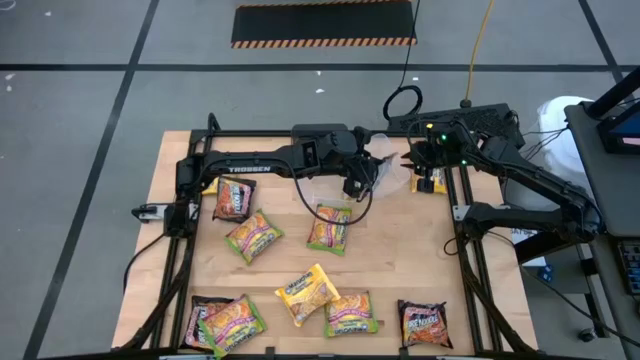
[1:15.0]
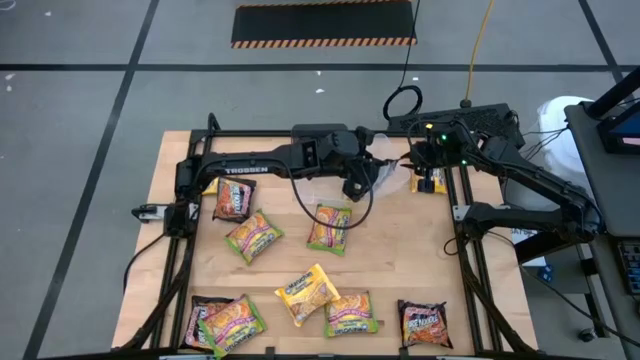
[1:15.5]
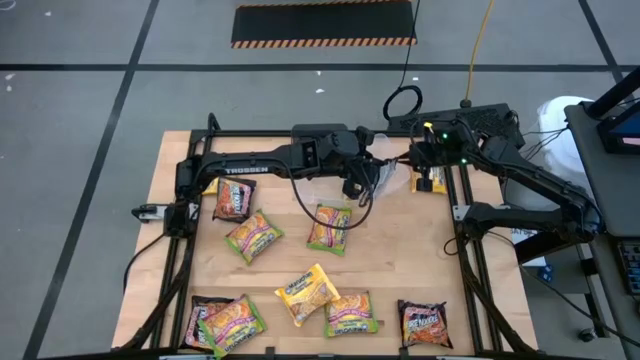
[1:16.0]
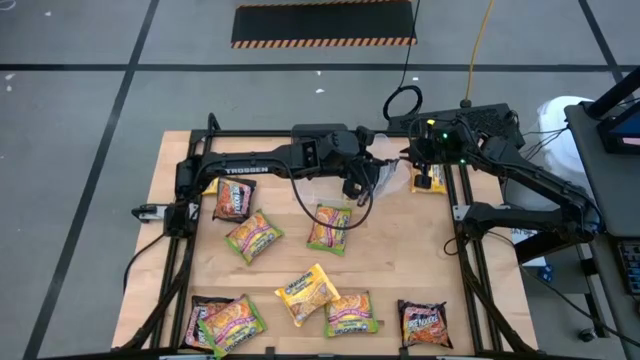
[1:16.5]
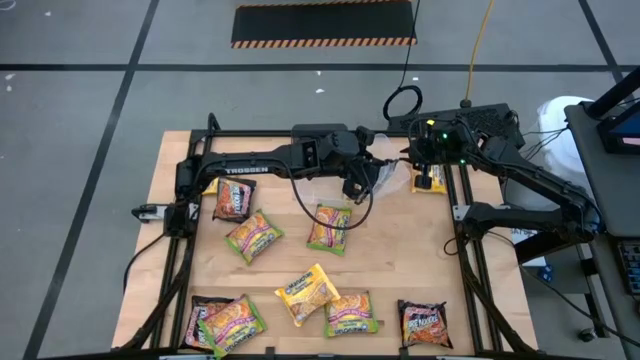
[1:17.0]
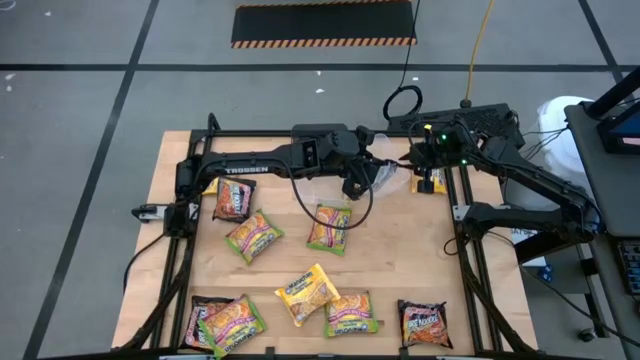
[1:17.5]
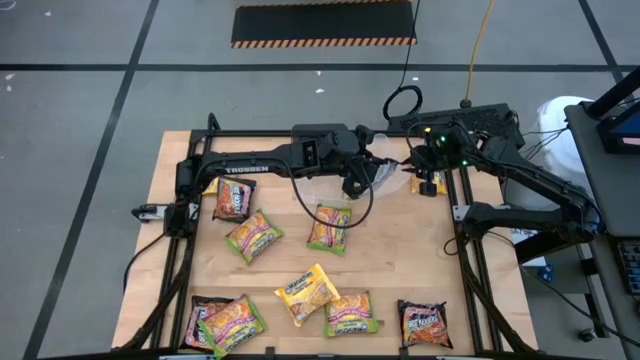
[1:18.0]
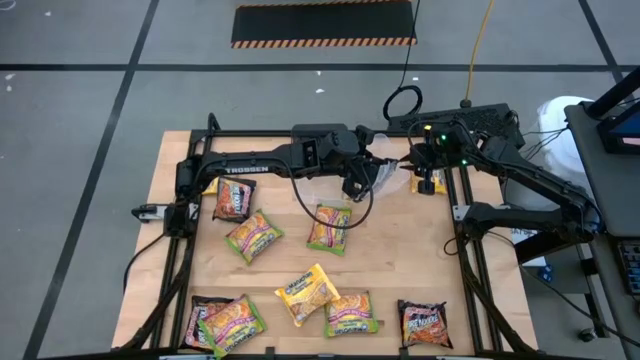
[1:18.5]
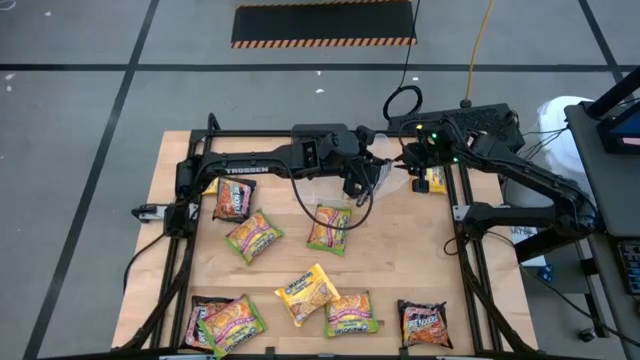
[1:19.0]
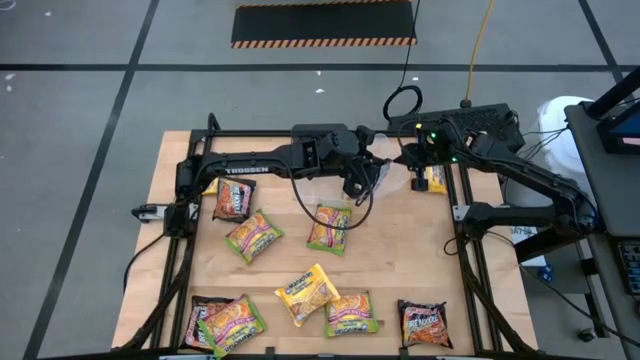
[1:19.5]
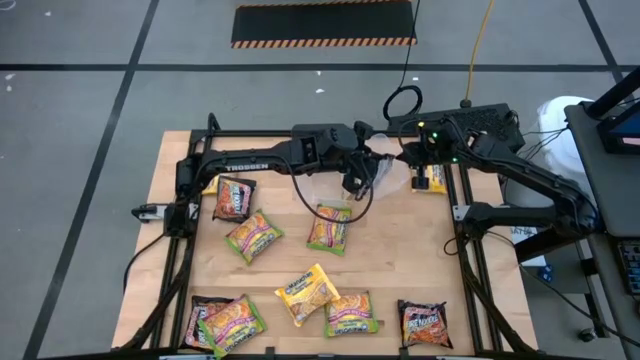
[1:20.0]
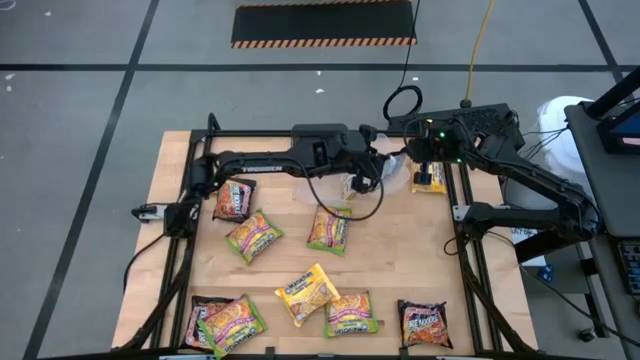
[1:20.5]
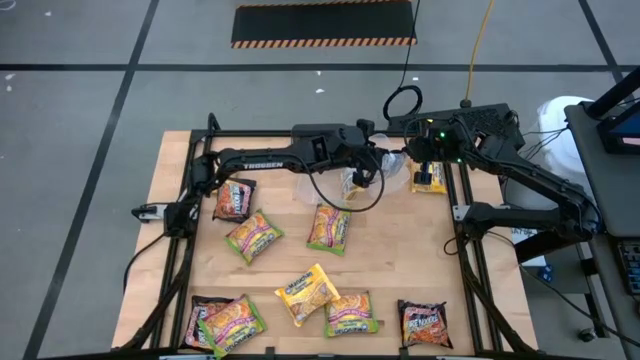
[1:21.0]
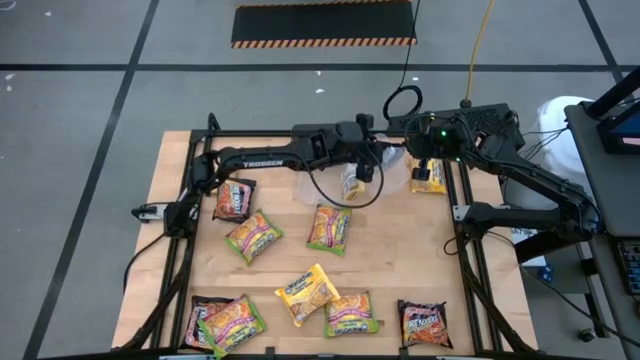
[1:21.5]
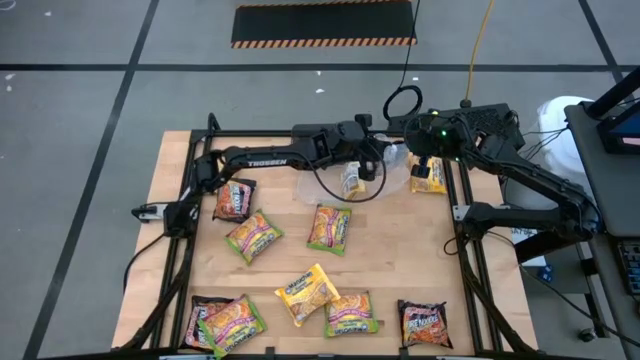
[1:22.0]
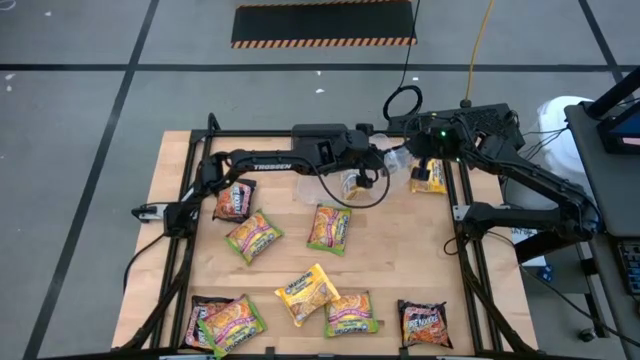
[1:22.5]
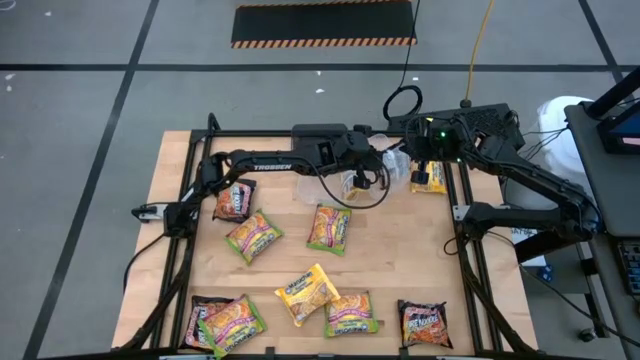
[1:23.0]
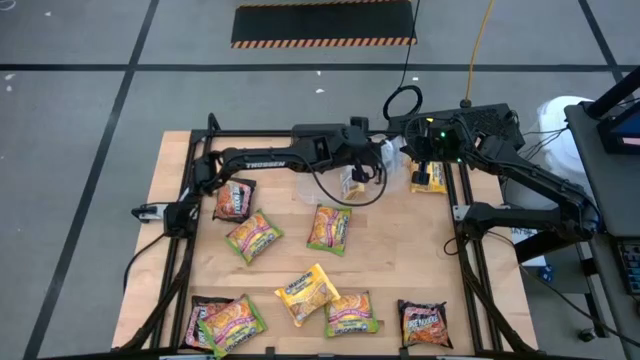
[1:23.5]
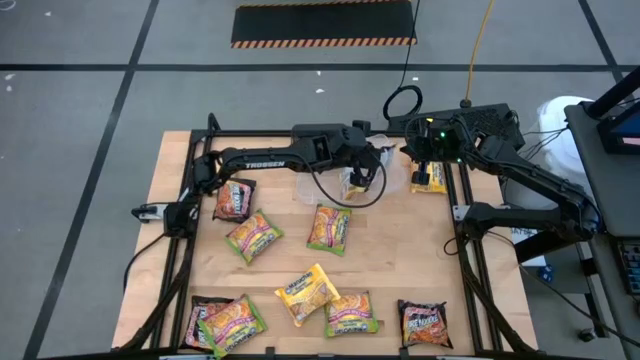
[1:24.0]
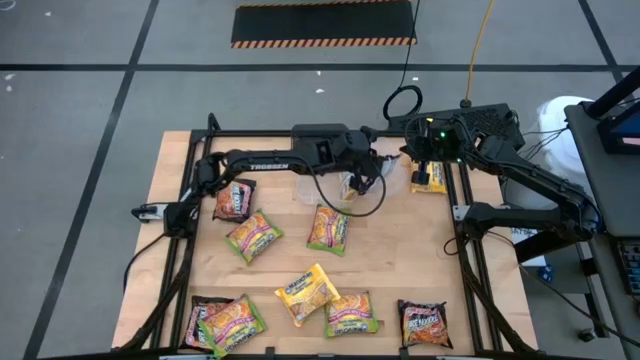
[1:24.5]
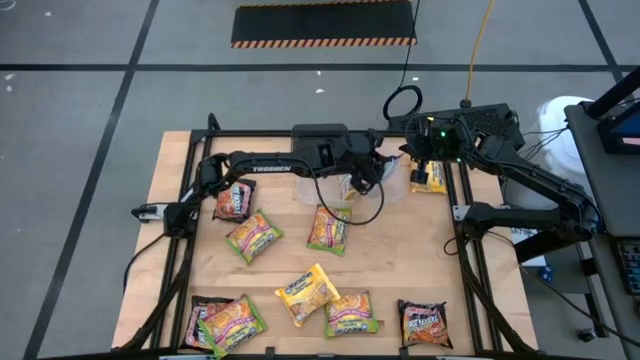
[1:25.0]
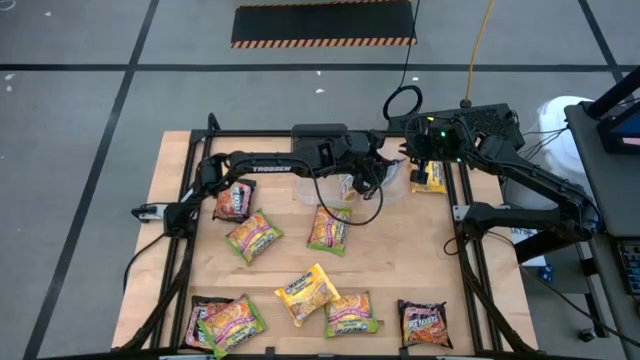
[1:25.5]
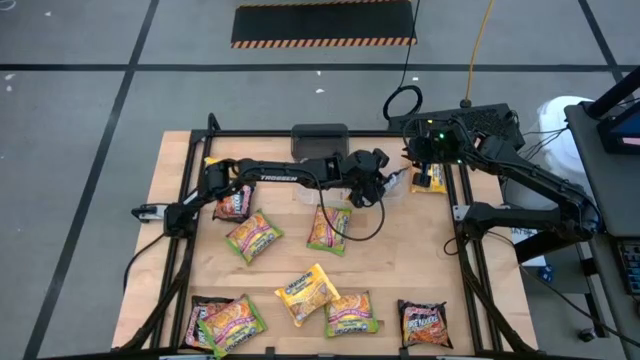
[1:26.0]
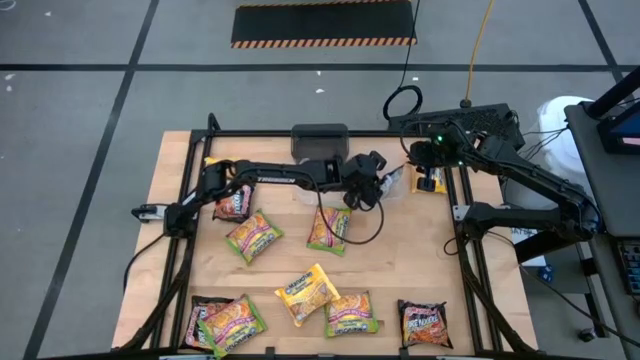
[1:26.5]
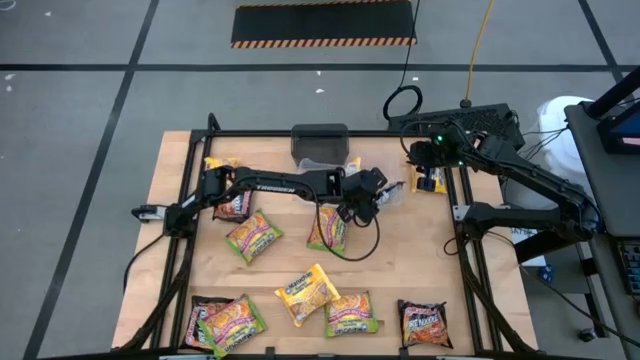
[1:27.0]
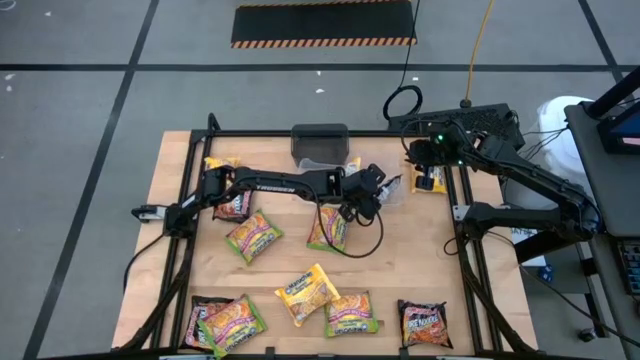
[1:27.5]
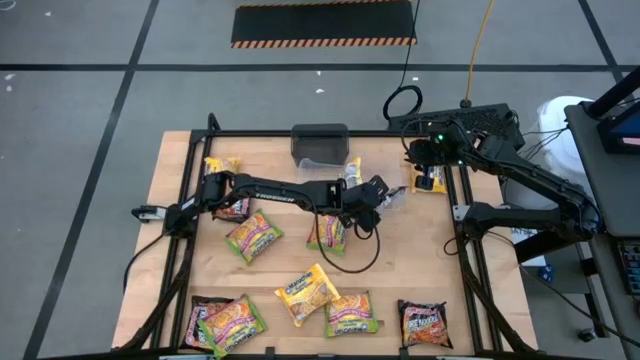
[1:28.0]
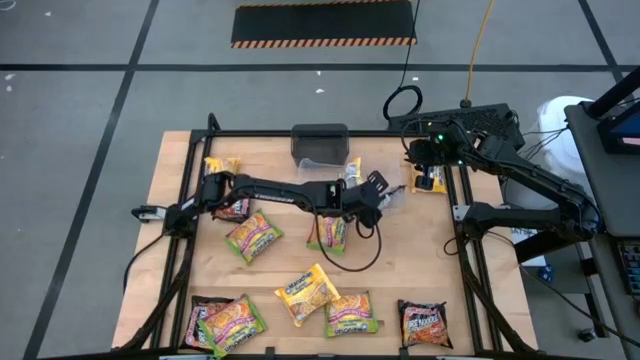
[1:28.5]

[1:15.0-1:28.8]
Task: Sort Maruchan noodles
Put the black noodle pack into the right transparent bin

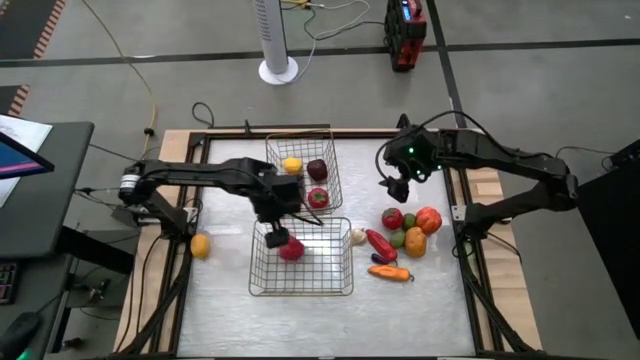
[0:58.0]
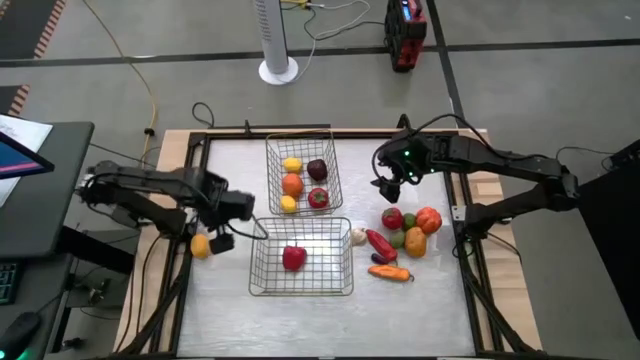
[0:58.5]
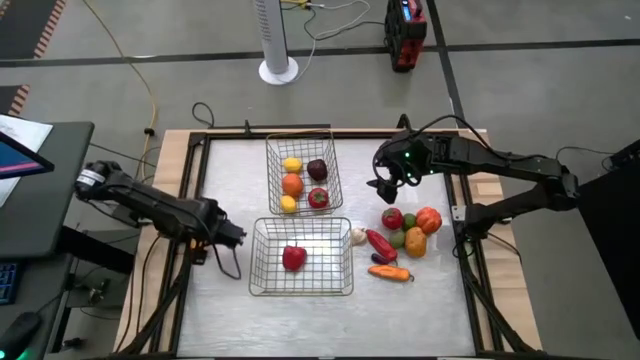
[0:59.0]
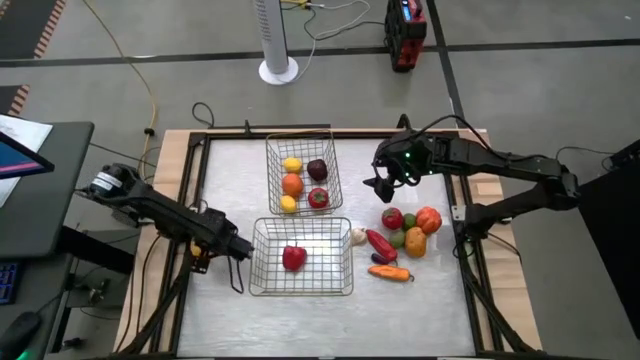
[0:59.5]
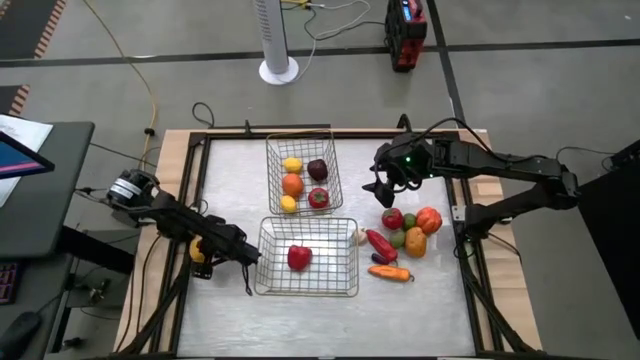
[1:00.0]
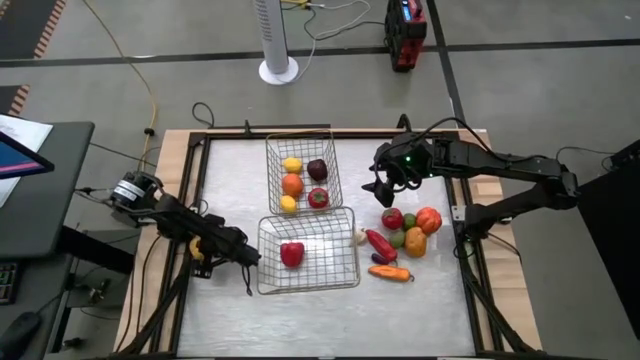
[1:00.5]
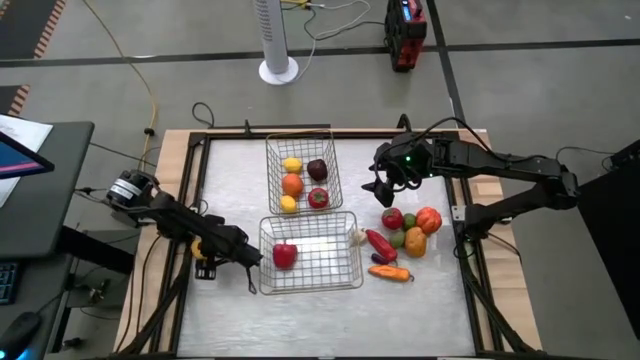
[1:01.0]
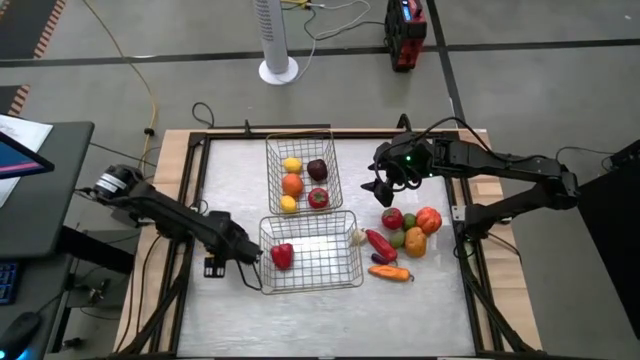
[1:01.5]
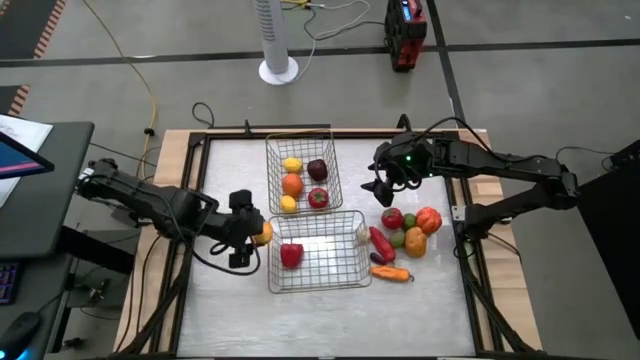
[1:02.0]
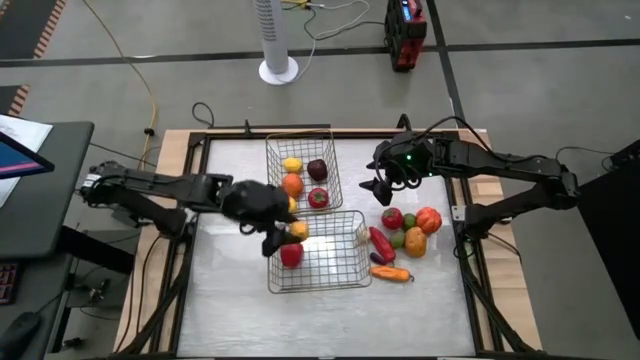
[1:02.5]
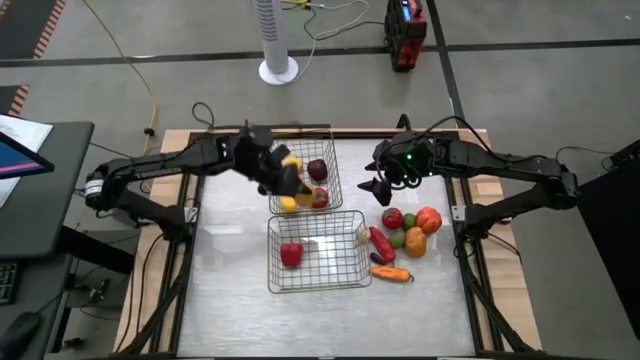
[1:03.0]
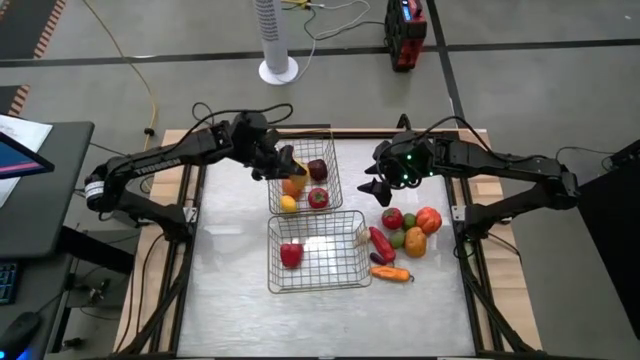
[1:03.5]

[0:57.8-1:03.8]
Task: Sort produce into baskets
Put the yellow lemon into the top wire basket

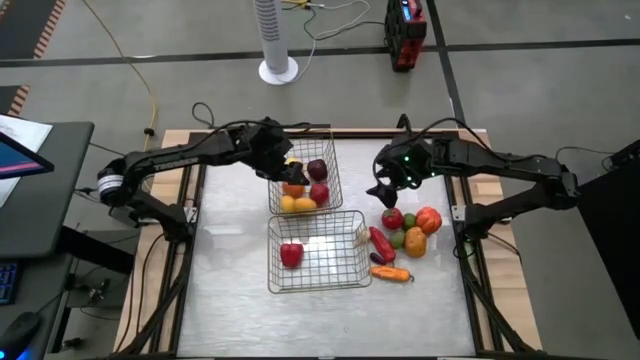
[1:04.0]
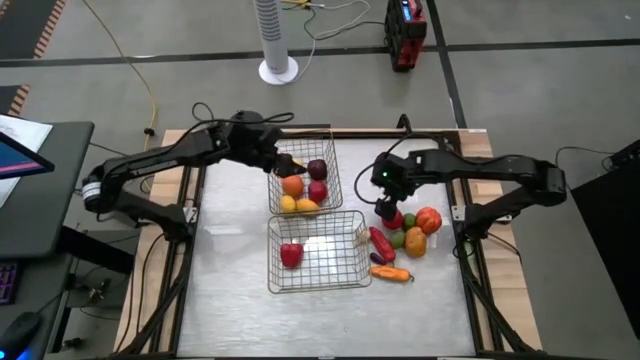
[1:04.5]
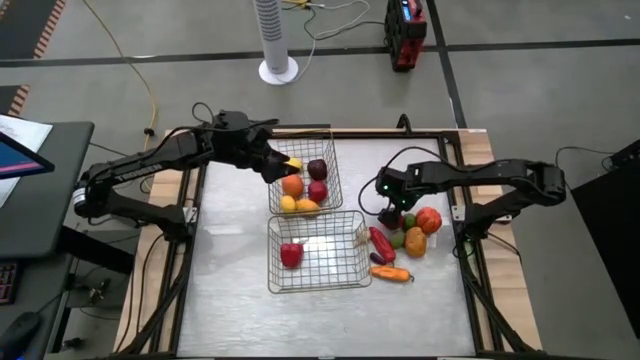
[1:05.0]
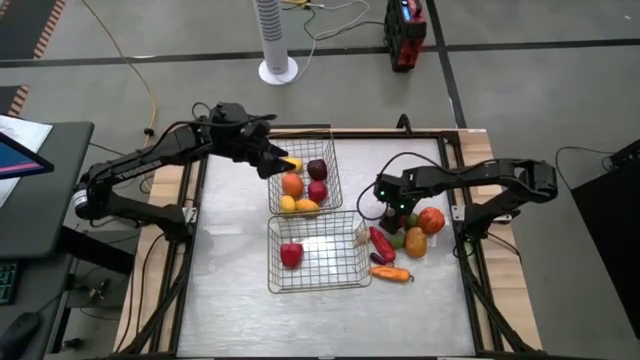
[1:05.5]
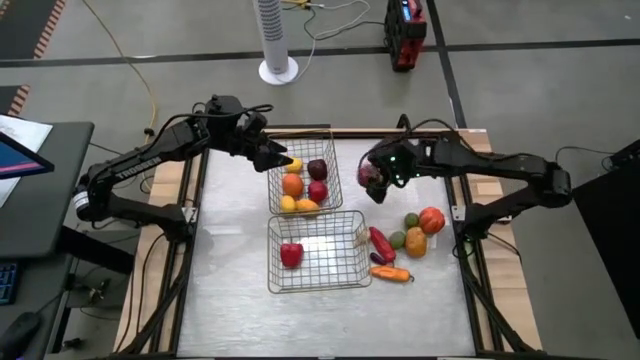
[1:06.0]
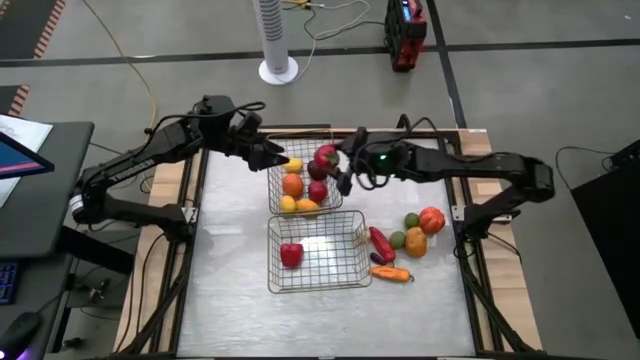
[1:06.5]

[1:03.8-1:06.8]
Put the red tomato into the top wire basket
